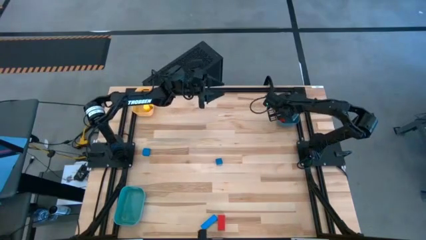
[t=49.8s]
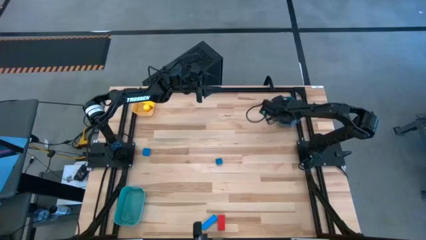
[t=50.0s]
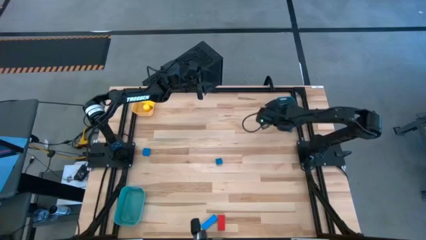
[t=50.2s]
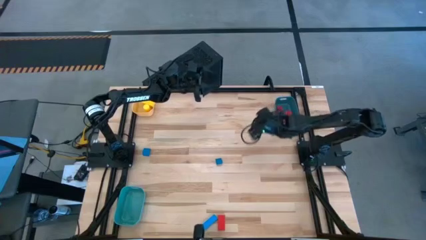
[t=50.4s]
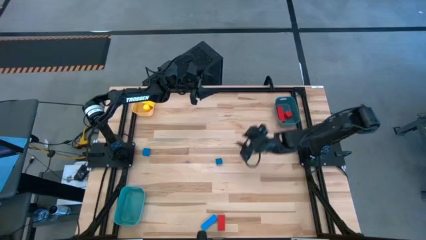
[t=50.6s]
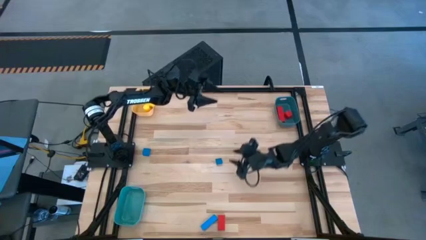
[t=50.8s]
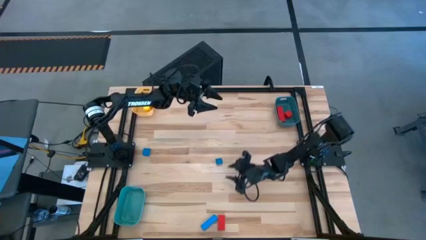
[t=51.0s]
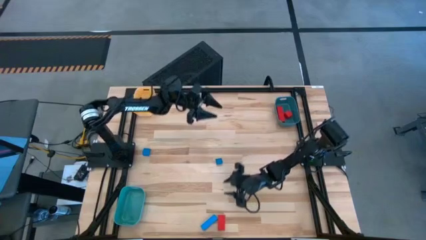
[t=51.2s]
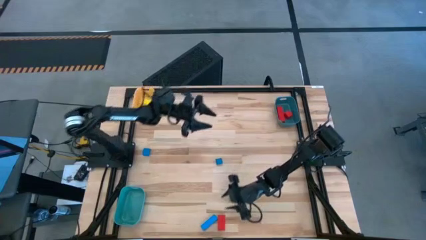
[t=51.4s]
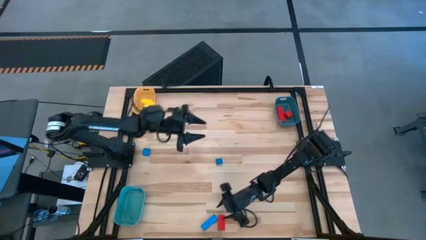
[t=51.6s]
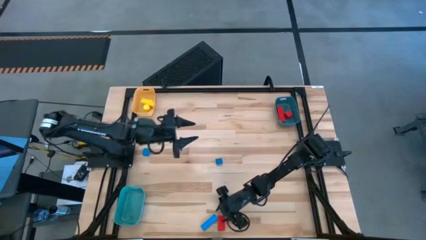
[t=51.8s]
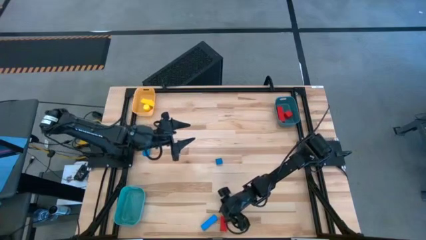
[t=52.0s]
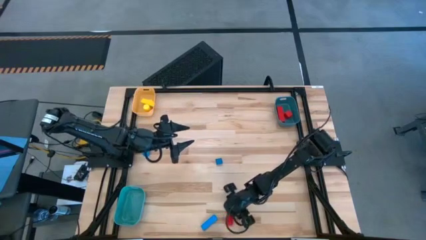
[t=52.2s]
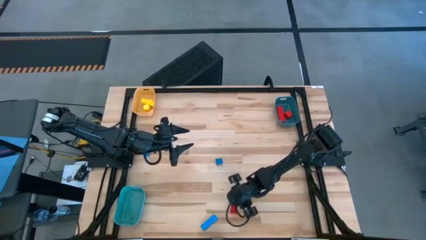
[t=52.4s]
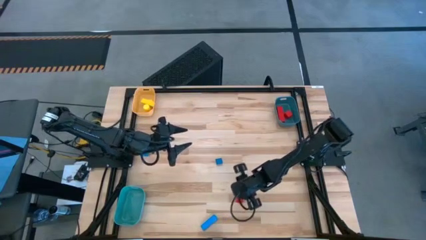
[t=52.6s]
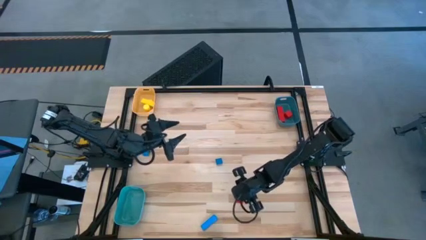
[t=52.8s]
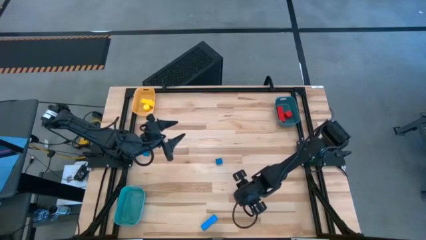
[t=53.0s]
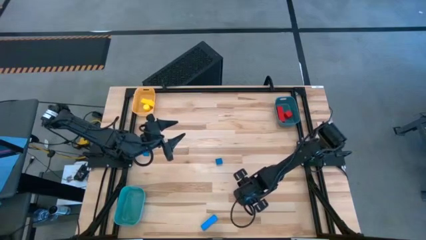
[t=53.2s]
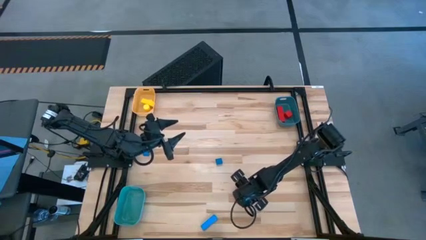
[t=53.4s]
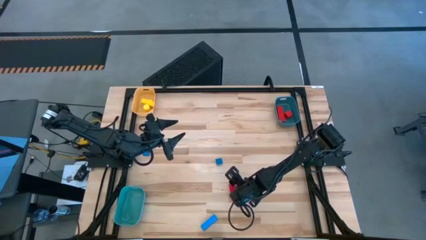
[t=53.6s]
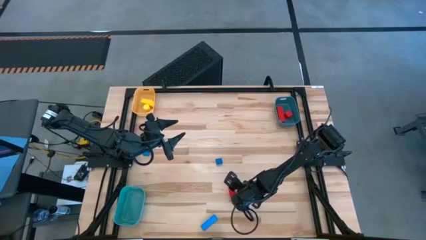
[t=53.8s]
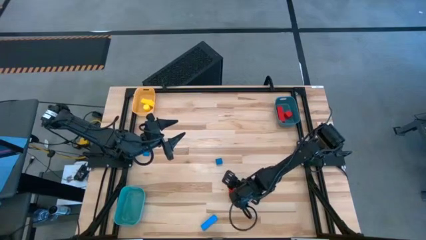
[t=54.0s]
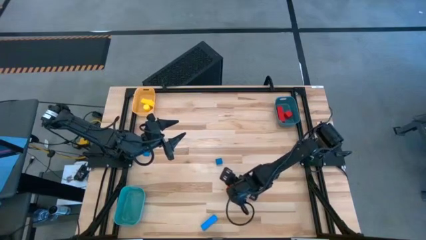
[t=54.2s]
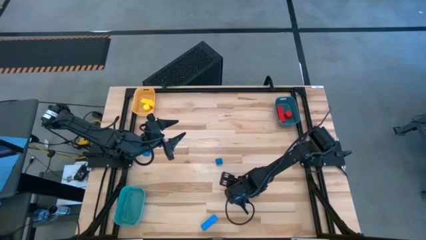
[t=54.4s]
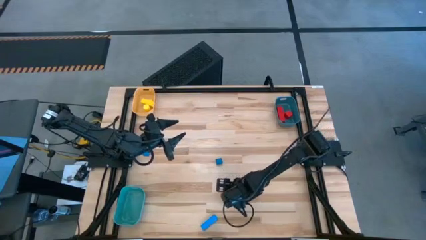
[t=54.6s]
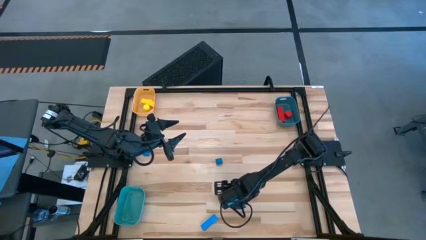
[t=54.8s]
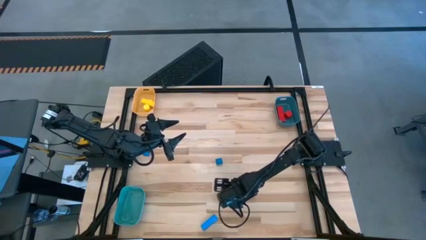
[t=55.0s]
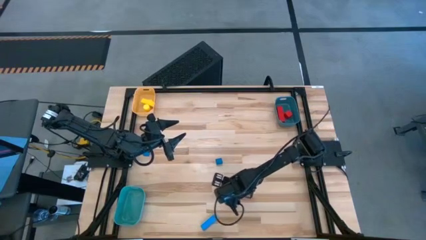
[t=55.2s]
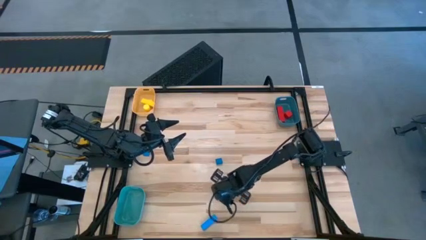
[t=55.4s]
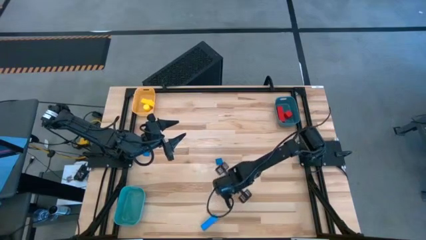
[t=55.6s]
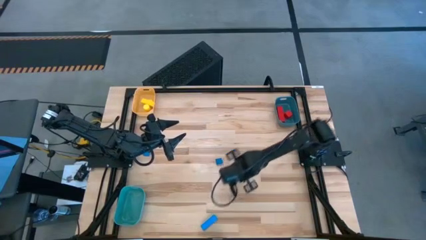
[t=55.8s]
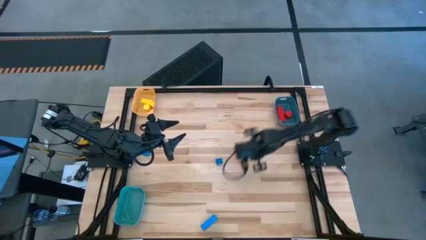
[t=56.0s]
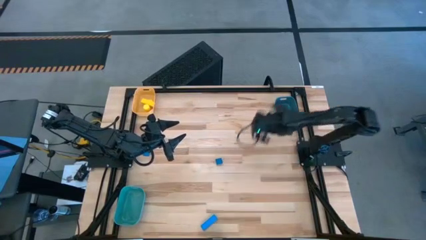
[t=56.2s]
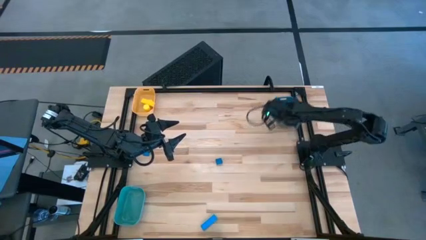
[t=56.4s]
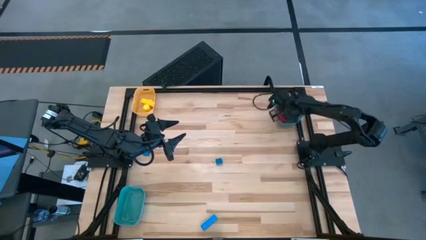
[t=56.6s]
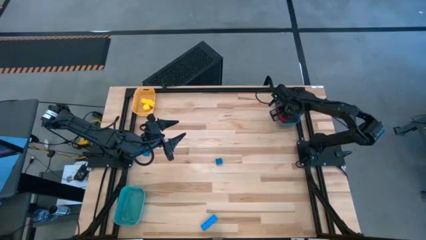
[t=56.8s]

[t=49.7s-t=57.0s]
Task: Sort & place blocks by color
Put the red block into the dark blue bin

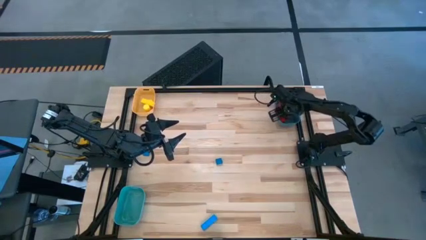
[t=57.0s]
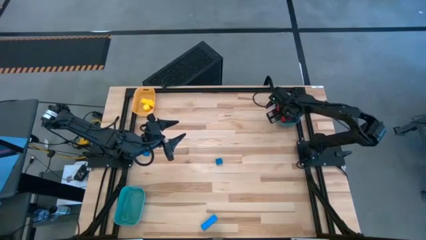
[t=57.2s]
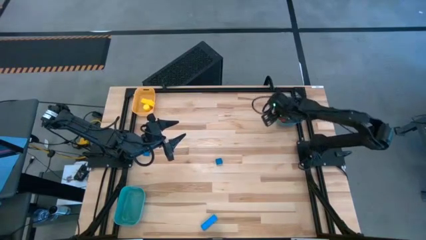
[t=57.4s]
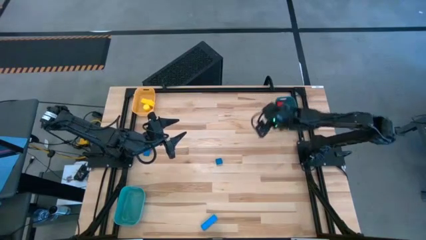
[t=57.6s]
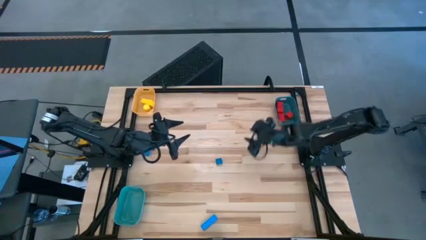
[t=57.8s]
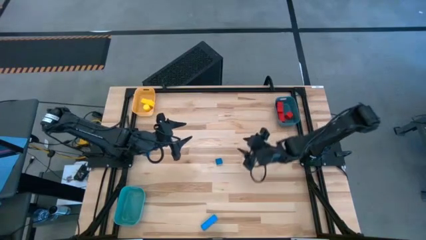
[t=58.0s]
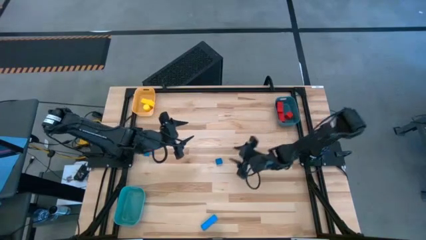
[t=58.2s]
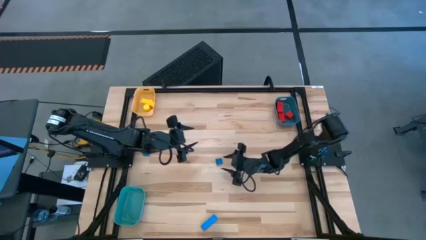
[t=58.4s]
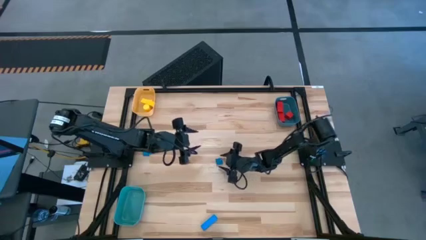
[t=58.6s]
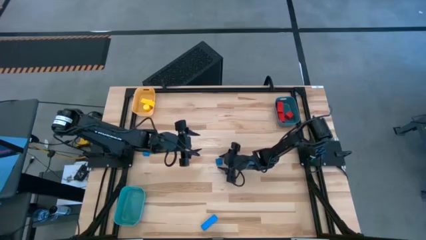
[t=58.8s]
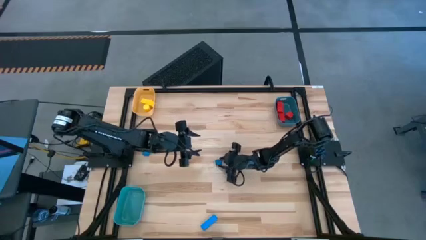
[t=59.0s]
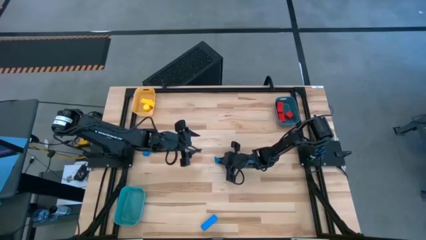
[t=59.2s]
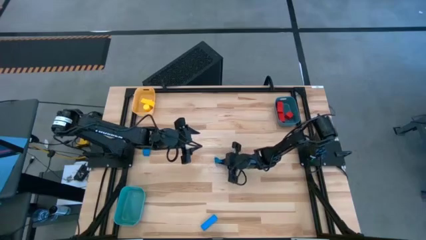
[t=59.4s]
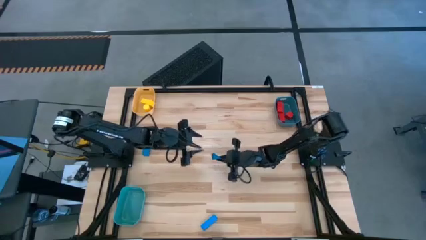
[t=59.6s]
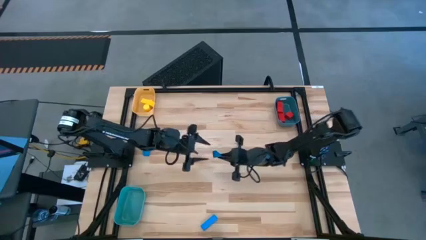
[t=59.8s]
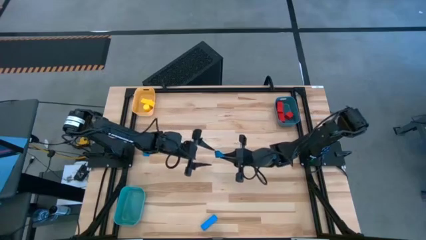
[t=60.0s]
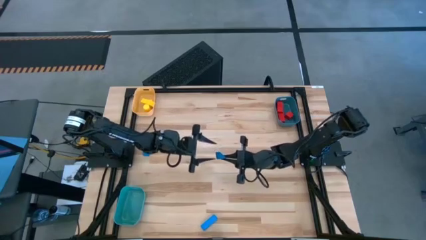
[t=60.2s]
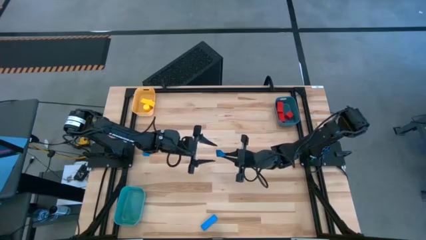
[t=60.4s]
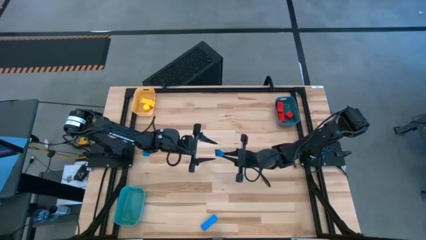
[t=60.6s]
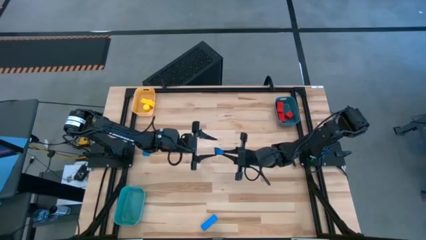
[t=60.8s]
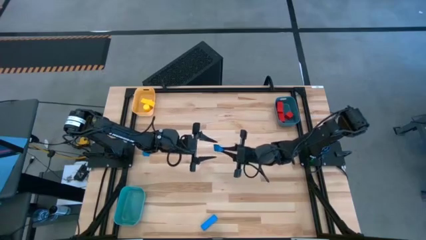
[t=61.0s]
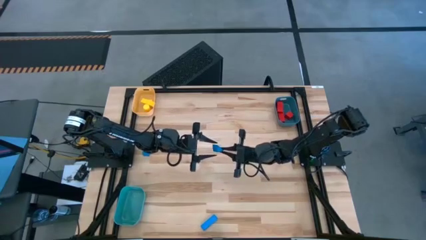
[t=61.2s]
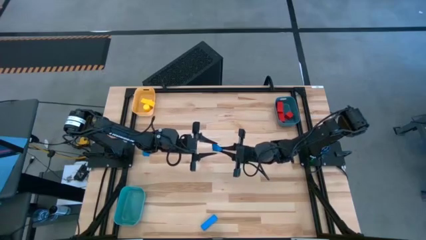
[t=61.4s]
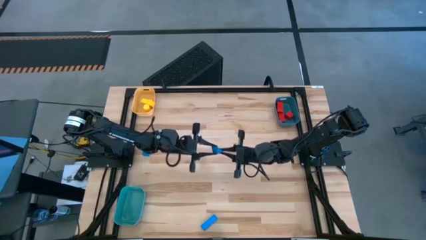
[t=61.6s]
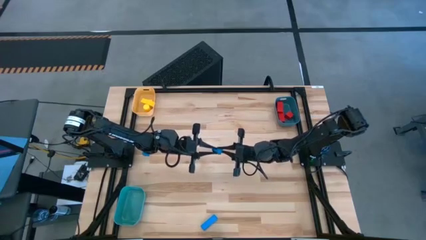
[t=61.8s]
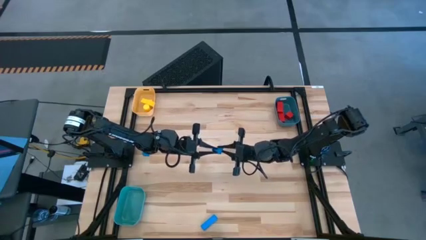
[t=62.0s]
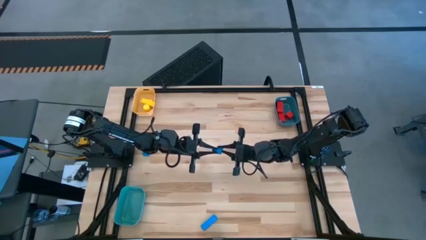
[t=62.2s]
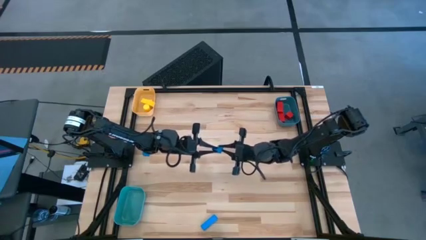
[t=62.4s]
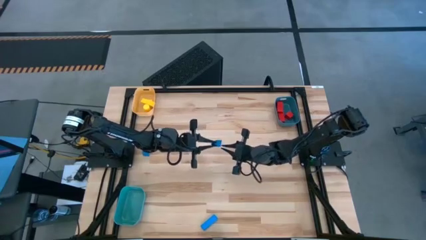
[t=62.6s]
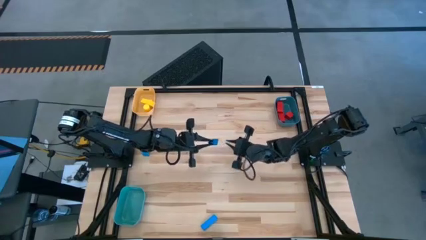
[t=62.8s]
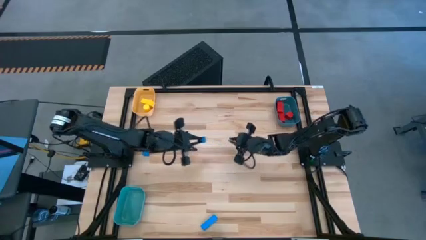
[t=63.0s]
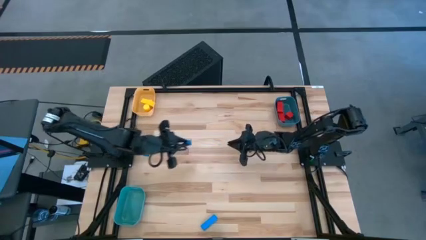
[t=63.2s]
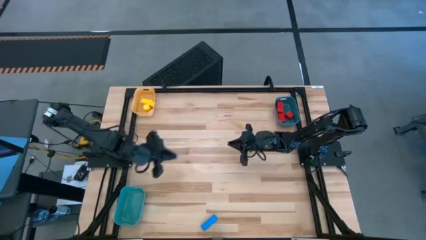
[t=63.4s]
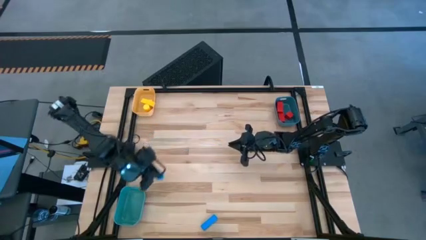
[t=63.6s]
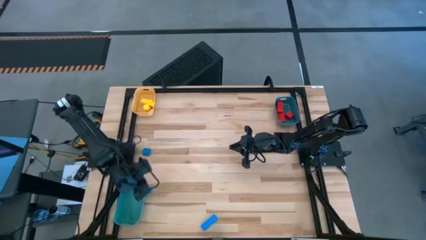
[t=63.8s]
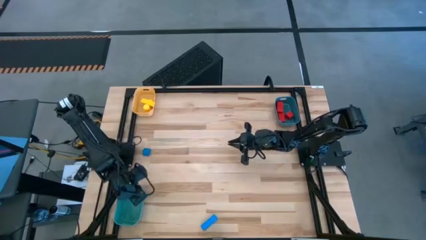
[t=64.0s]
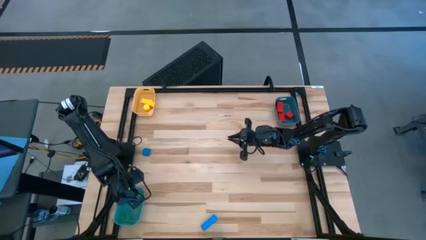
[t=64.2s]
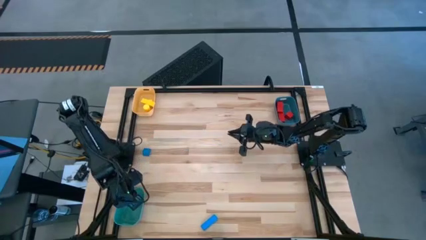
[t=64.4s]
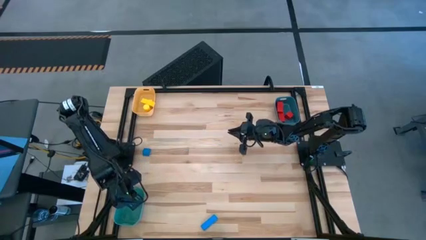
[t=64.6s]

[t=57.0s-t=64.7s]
Put the top right blue block into the green bin

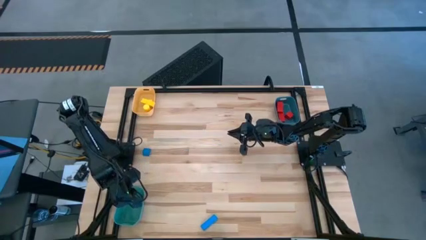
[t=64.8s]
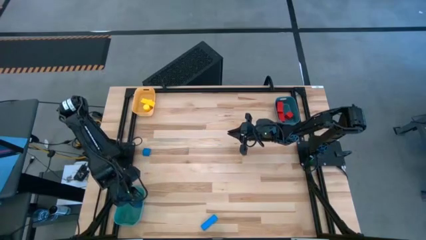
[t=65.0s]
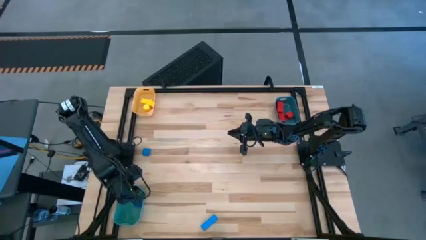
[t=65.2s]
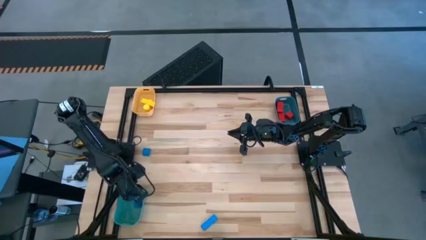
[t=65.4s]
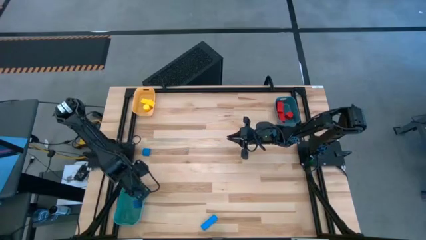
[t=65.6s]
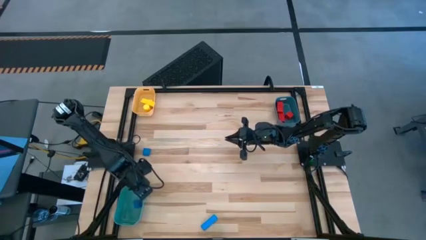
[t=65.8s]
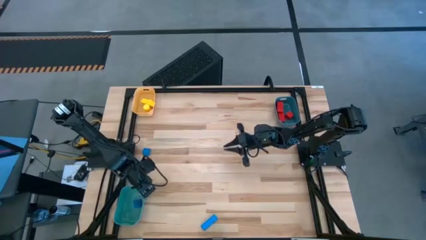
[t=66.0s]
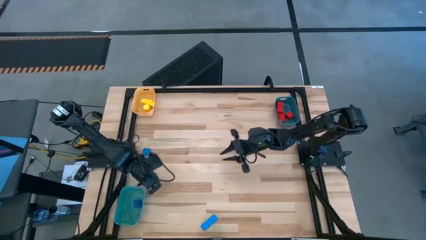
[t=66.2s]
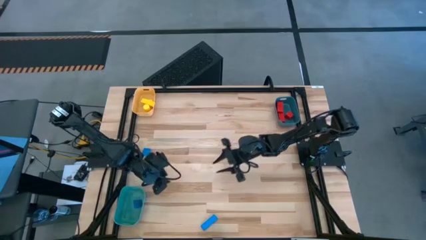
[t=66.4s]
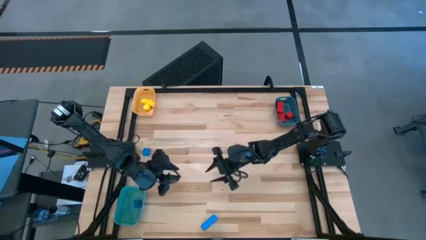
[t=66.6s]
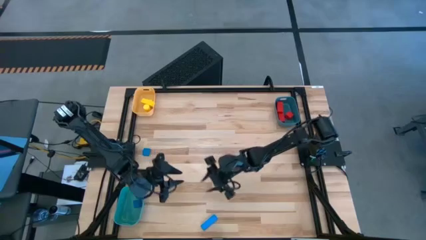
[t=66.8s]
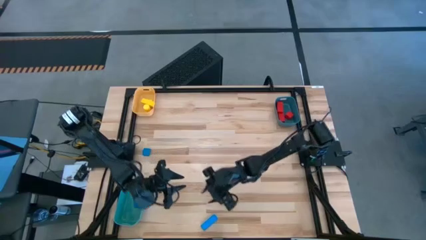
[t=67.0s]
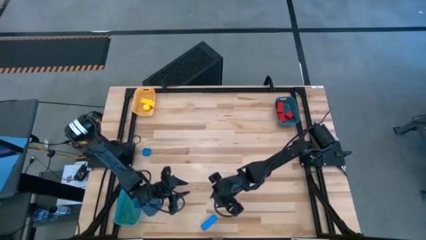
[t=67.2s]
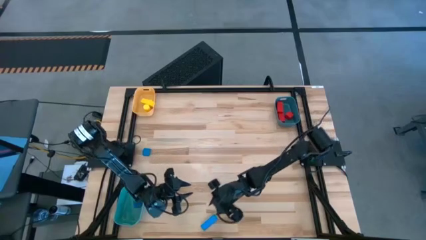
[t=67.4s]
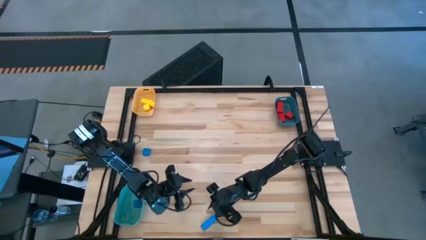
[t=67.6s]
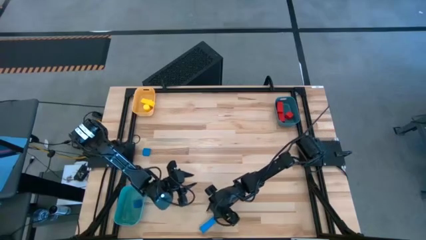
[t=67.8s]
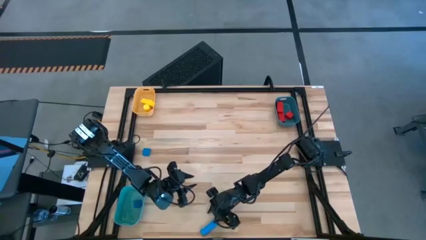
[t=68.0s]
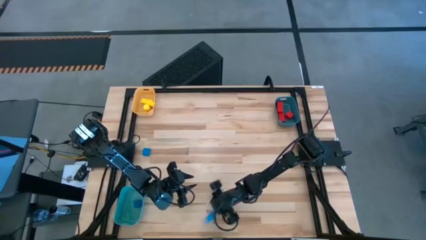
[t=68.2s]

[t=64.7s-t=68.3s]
Put the bottom blue block into the green bin
